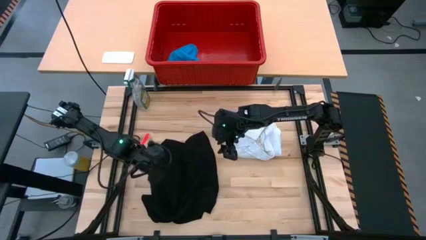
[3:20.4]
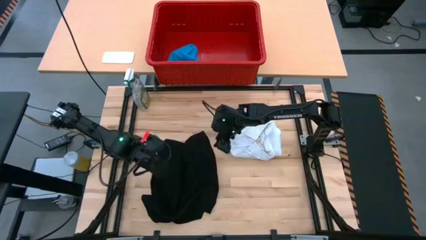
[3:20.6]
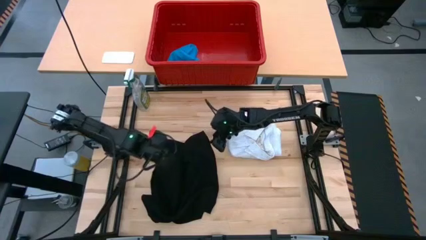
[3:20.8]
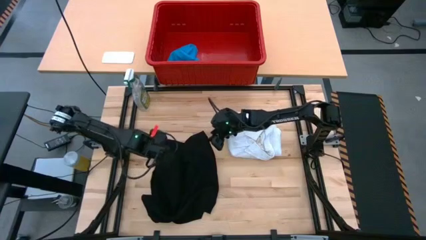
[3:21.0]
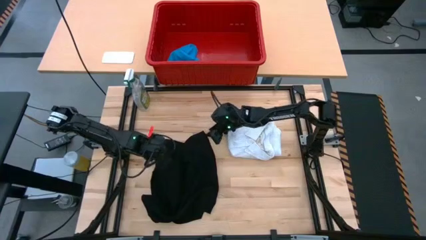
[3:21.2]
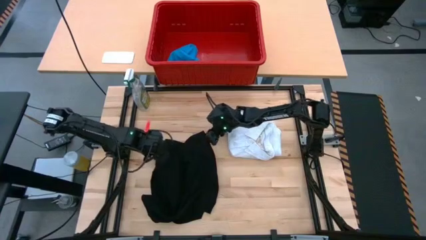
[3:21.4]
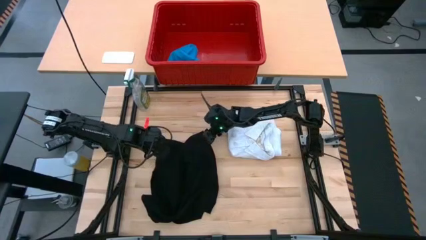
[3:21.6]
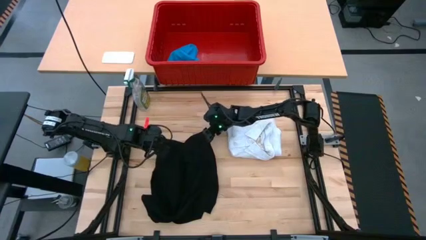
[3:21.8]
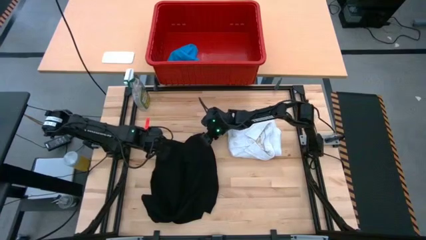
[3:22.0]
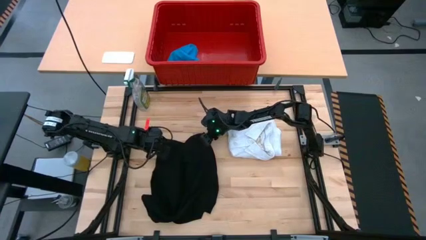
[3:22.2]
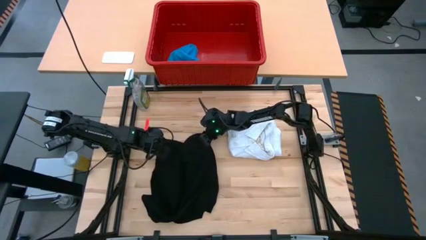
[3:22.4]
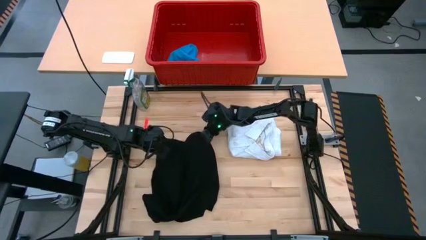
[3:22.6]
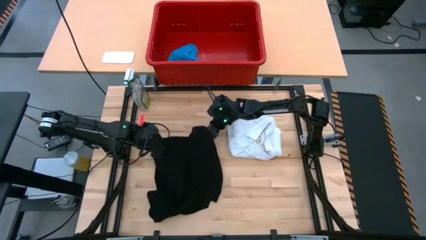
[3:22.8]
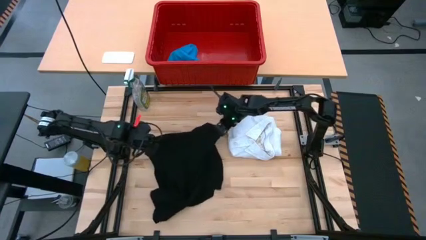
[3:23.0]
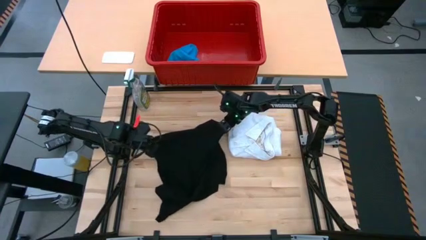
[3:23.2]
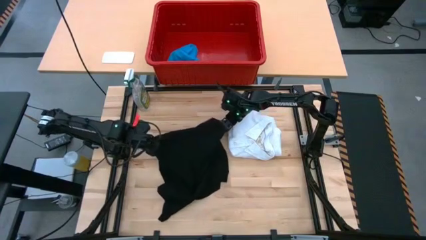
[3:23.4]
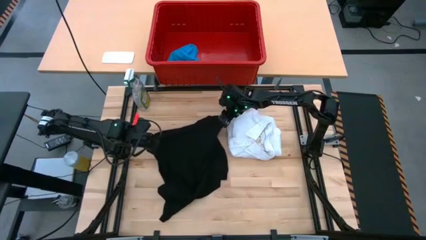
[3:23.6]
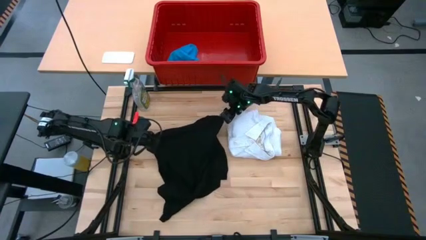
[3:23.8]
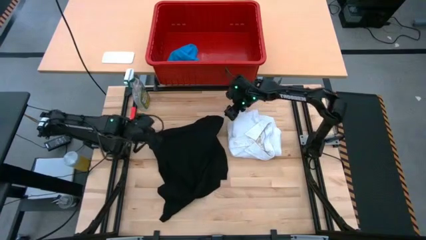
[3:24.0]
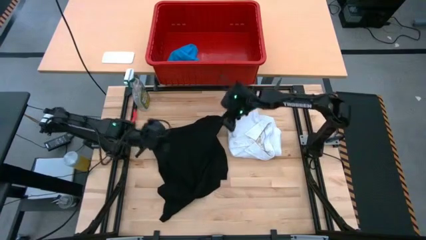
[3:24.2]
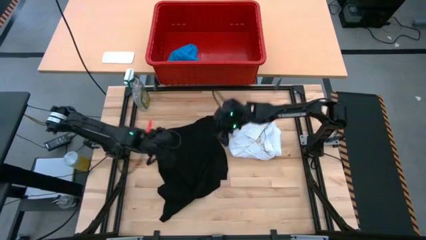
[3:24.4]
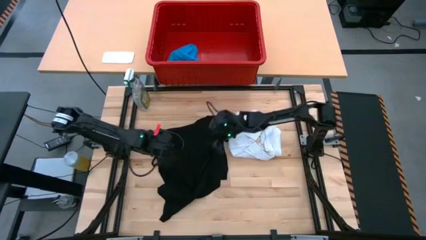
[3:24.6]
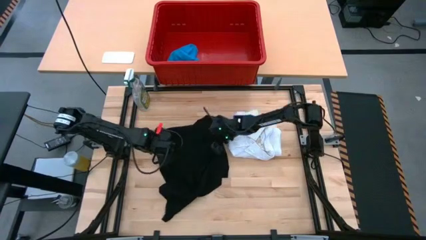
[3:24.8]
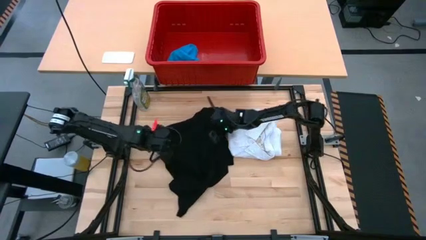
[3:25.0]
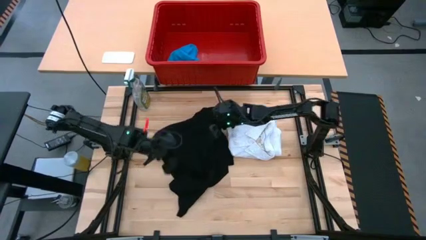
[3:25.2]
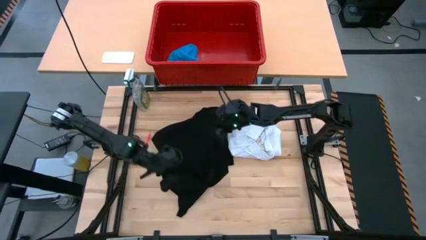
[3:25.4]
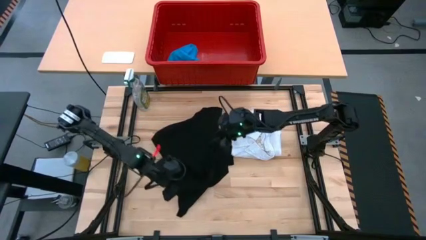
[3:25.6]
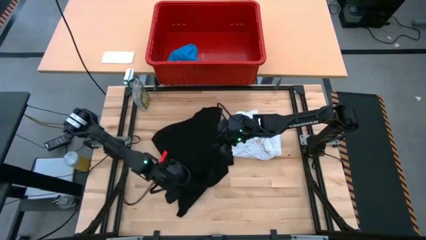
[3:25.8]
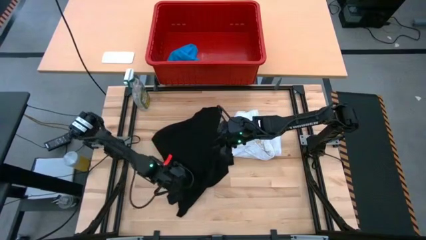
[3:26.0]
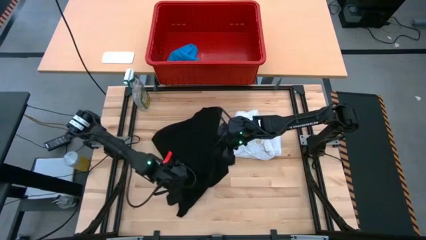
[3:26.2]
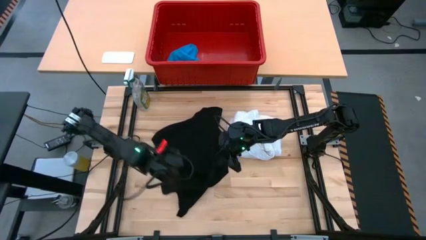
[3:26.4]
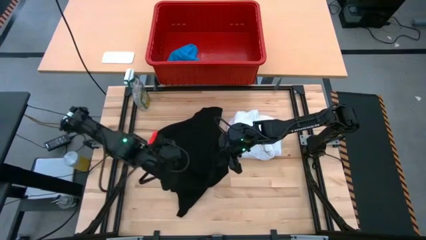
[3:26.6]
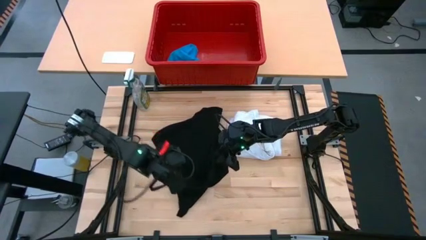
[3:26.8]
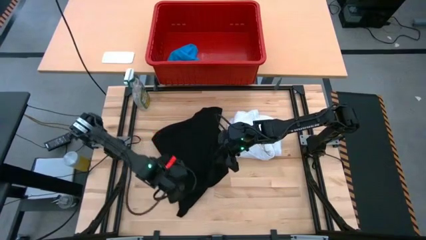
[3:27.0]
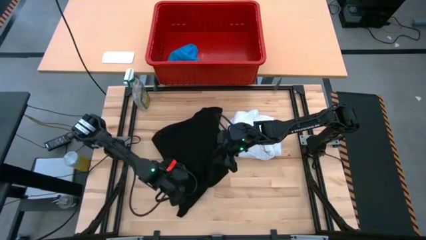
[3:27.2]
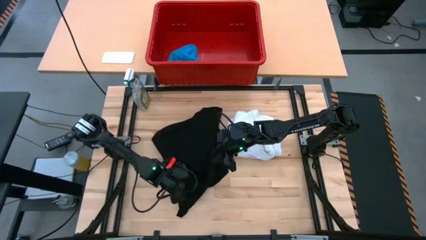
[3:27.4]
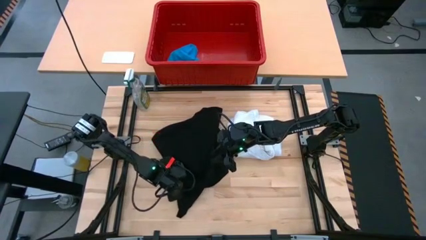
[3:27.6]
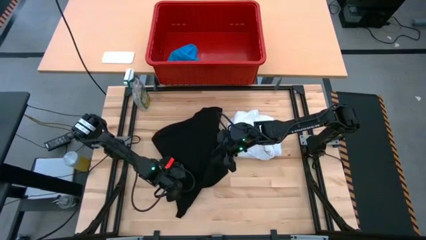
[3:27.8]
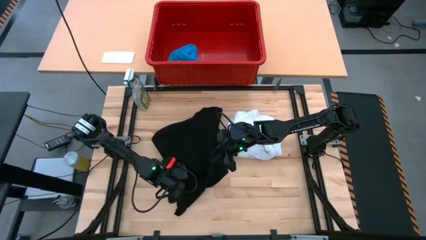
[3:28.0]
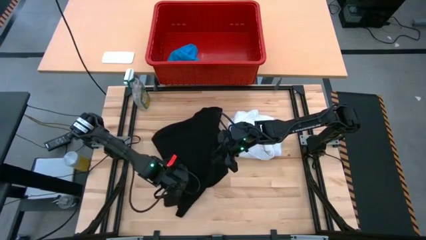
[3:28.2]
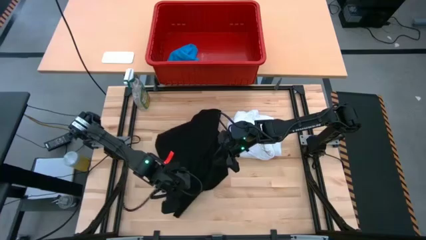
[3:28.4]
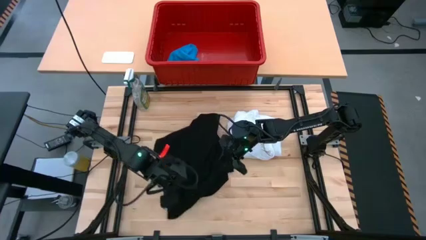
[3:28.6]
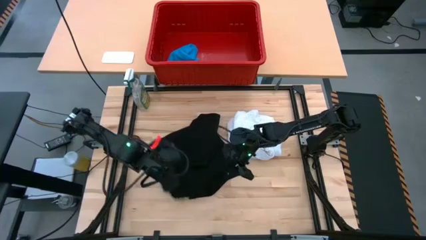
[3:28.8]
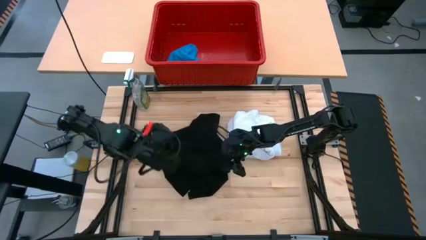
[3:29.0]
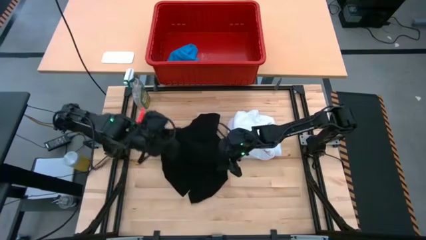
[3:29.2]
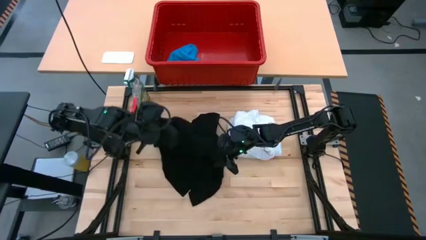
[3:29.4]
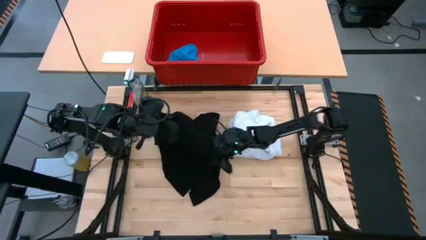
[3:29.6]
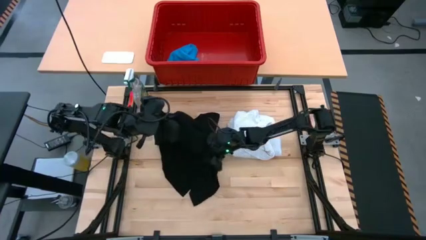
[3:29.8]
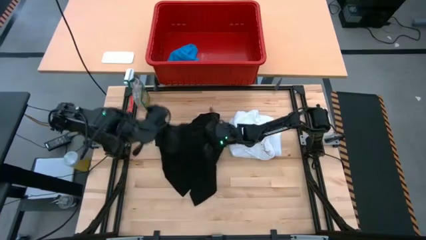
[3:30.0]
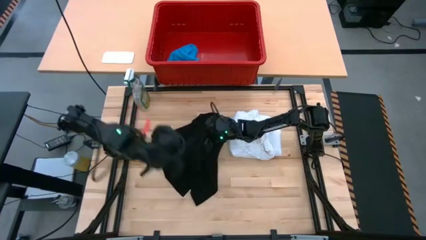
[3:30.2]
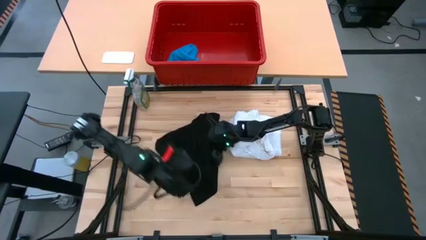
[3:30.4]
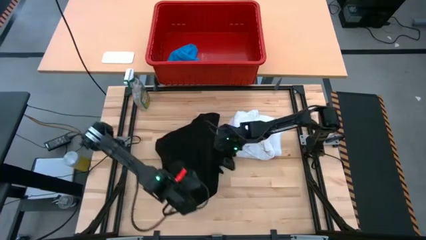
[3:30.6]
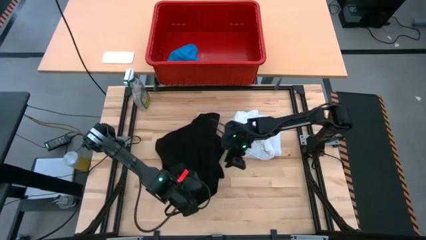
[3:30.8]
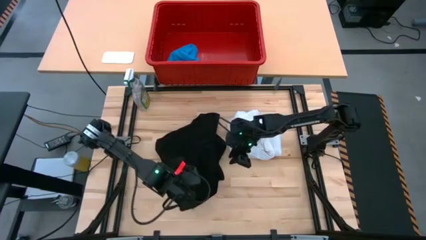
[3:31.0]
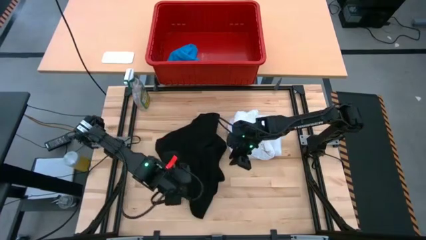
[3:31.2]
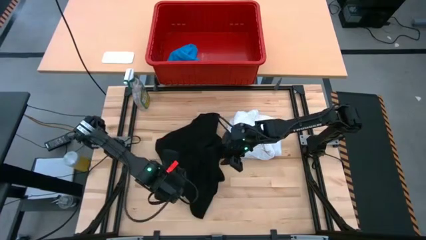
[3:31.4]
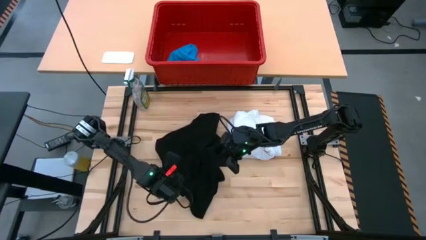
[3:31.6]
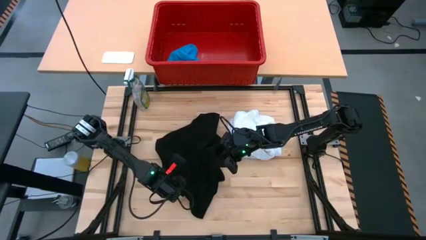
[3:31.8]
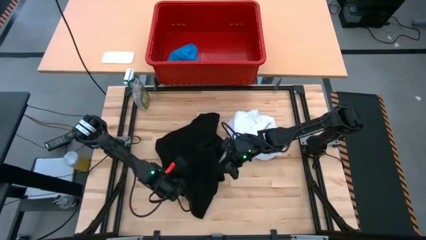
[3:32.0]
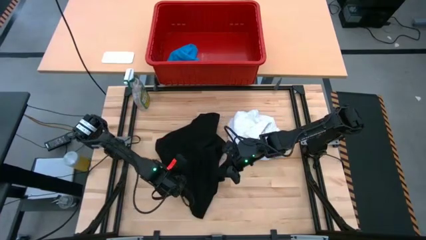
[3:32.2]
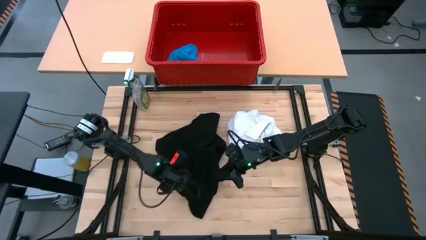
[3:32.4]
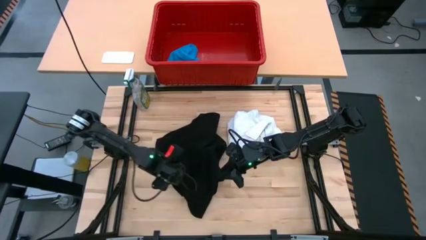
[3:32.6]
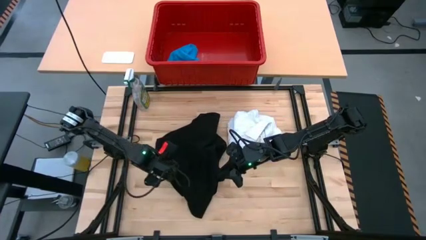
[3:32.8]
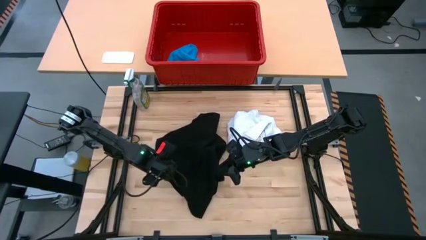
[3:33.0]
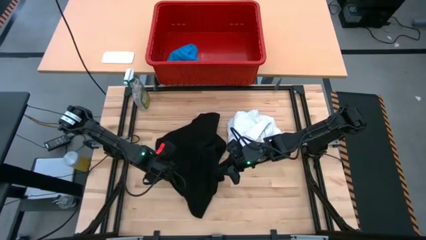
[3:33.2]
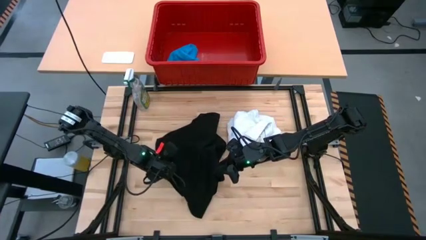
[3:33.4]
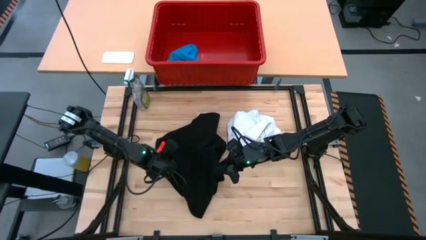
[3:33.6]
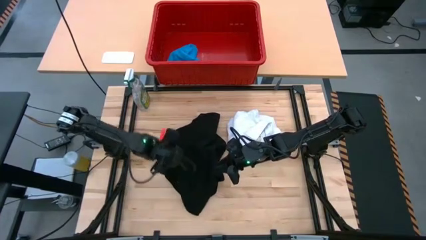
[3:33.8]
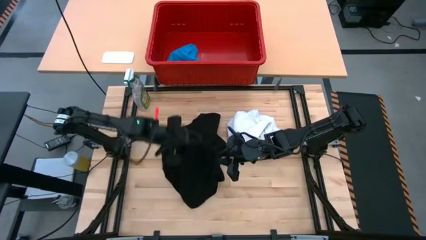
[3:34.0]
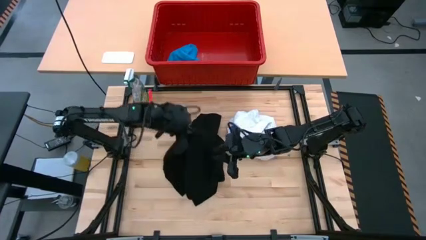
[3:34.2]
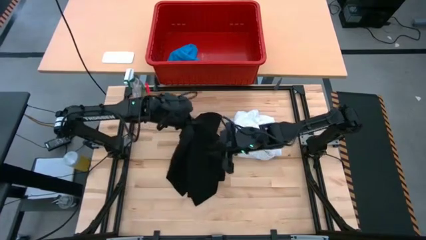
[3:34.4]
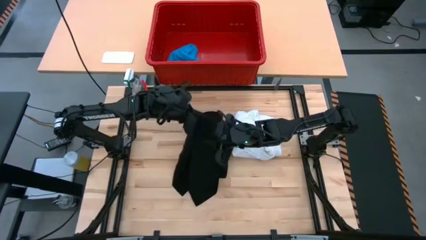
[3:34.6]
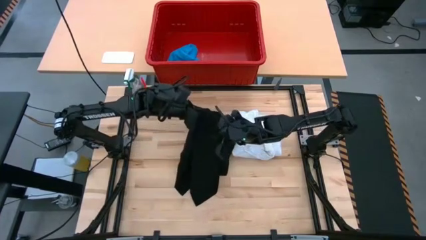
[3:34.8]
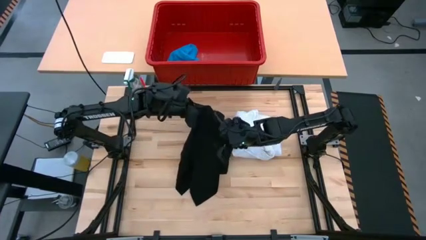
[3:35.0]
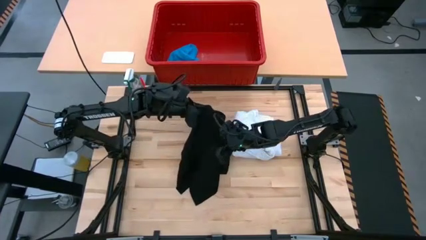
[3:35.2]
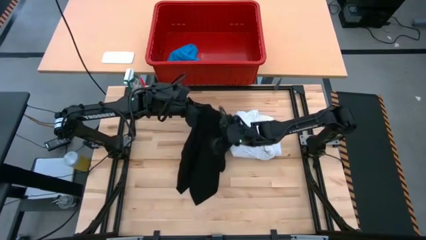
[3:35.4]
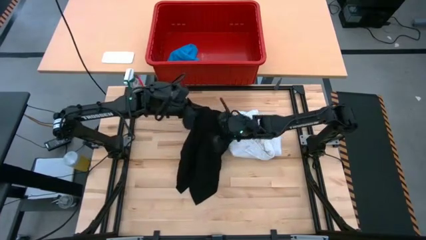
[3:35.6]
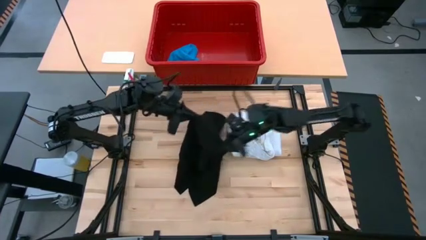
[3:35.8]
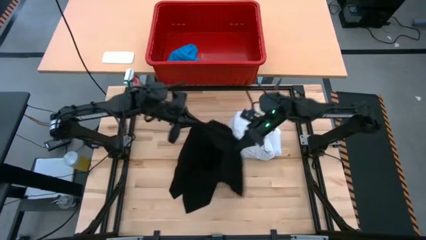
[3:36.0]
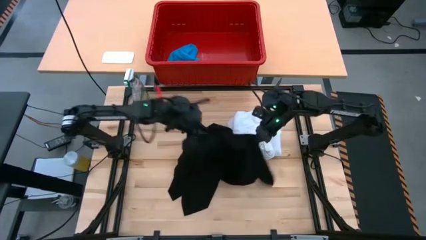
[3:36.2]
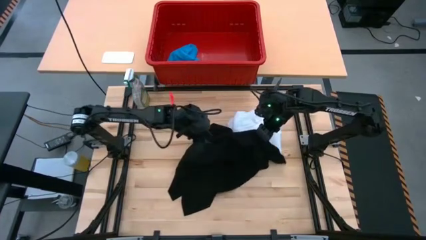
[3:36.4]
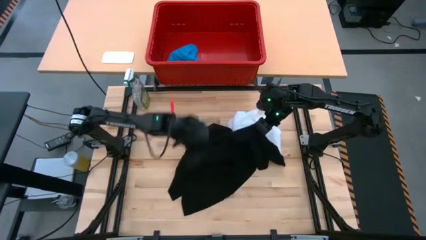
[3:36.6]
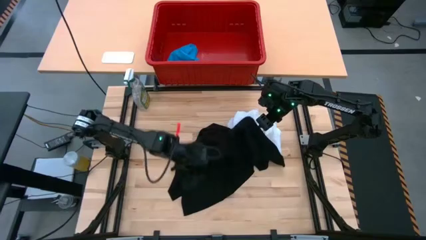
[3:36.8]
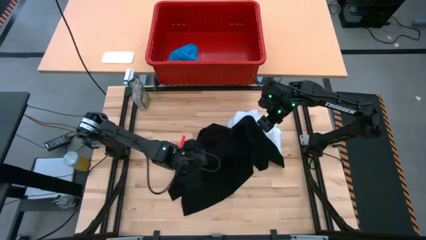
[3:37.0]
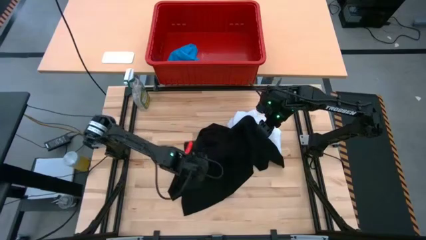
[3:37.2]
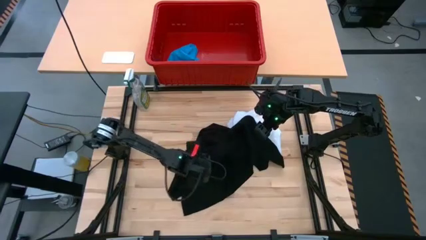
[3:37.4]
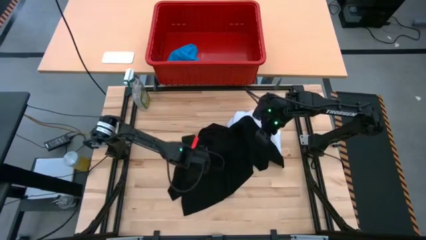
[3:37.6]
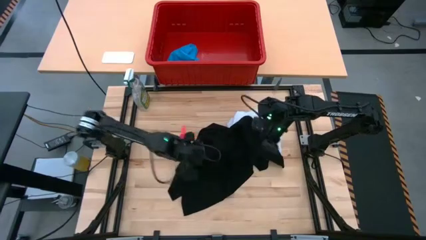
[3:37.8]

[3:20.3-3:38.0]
Task: Fold laundry
Fold the black shirt
